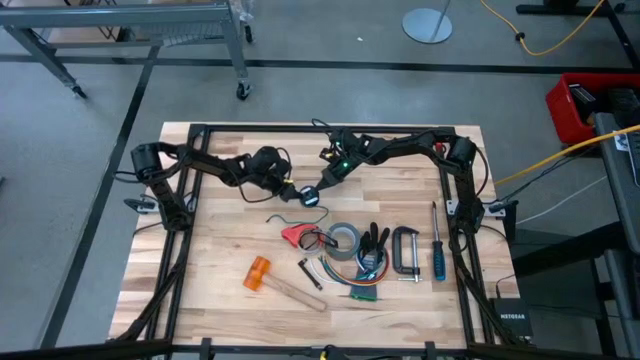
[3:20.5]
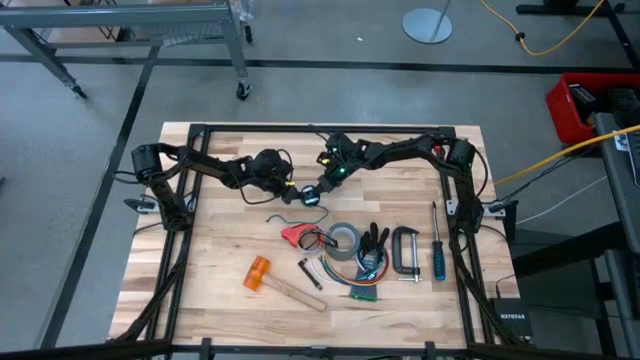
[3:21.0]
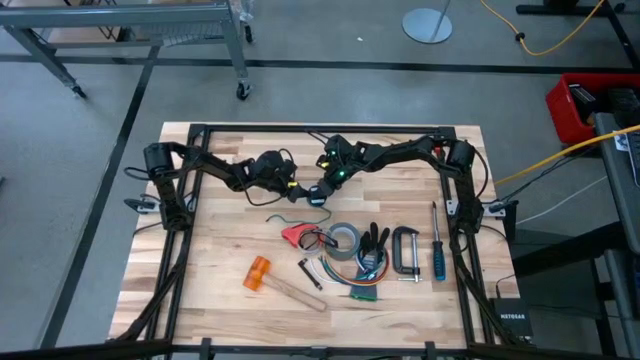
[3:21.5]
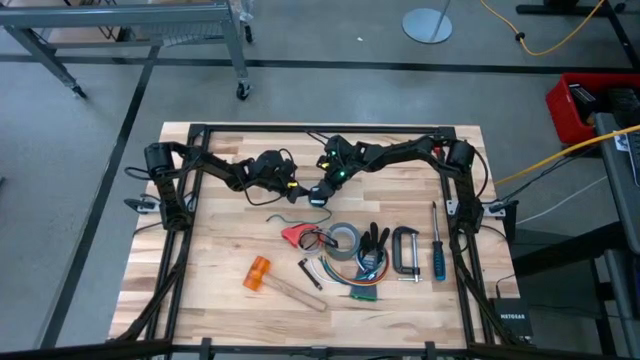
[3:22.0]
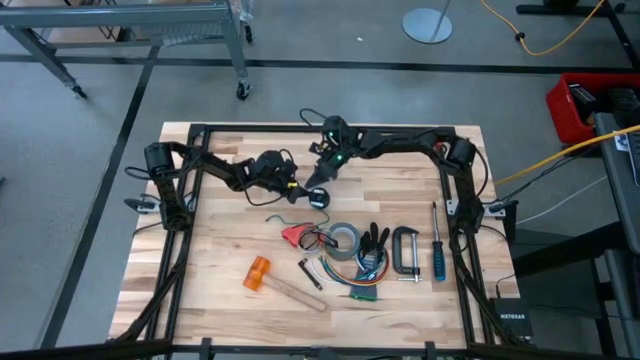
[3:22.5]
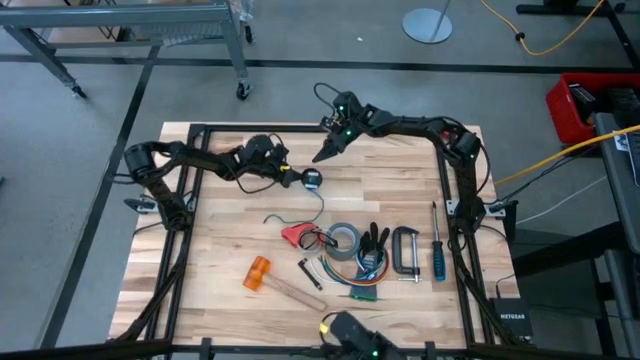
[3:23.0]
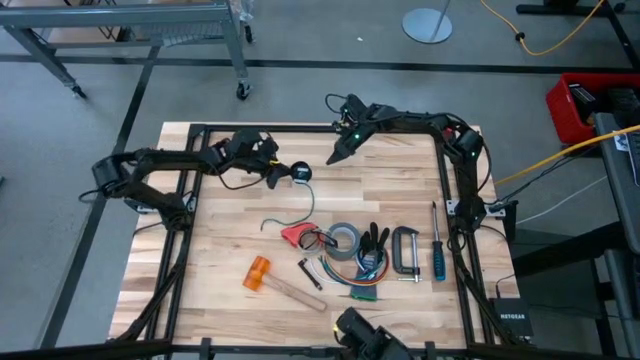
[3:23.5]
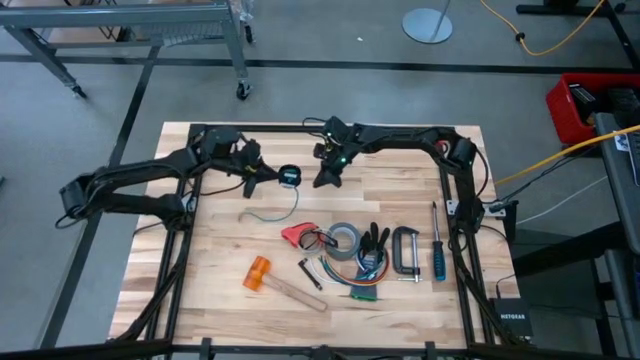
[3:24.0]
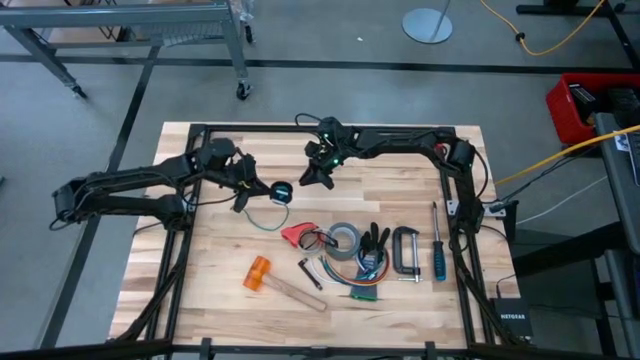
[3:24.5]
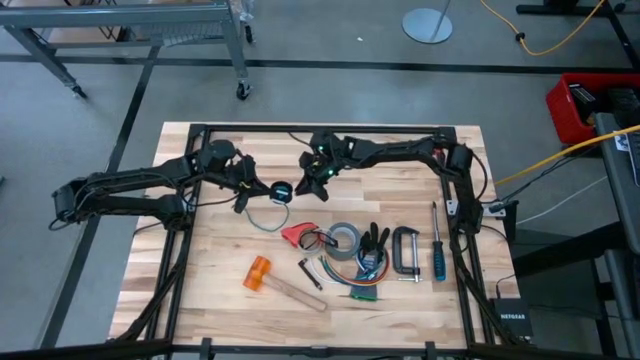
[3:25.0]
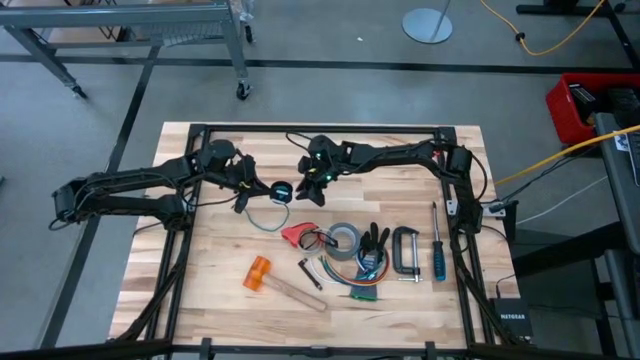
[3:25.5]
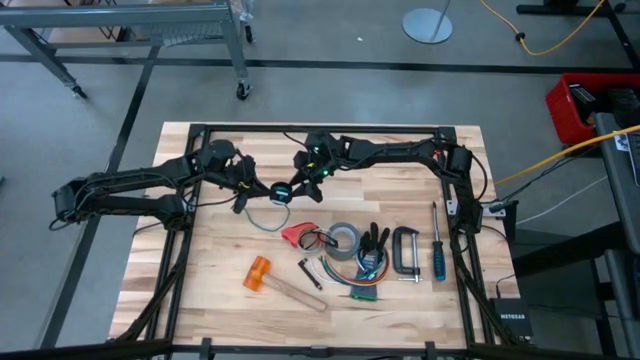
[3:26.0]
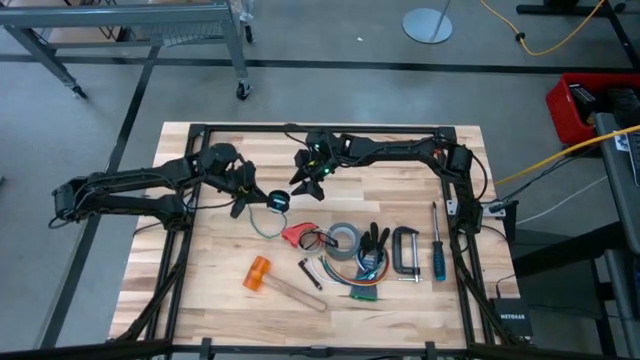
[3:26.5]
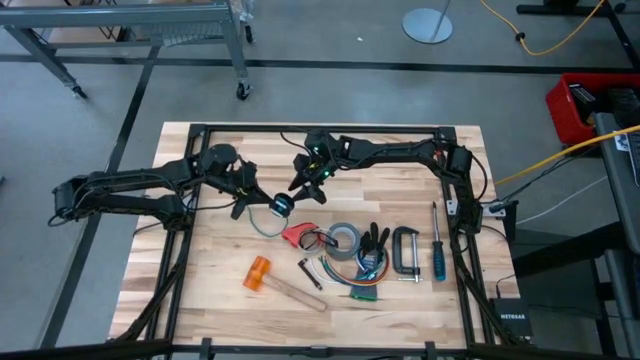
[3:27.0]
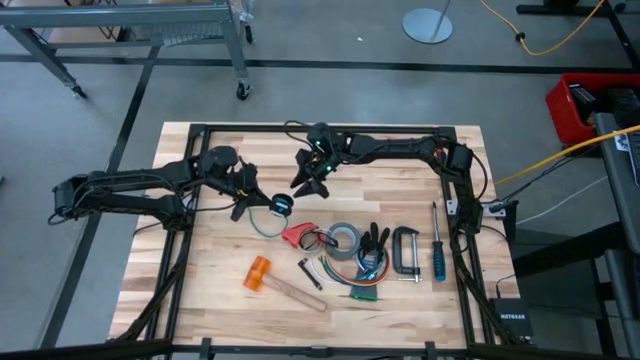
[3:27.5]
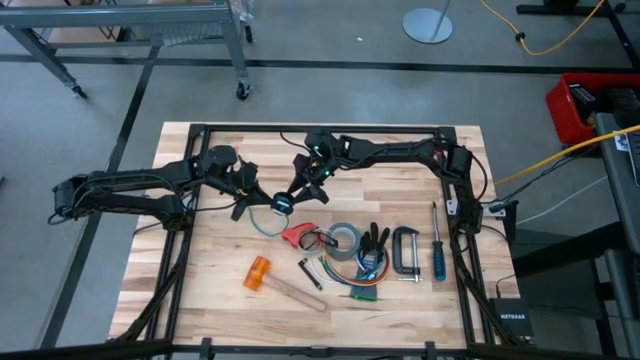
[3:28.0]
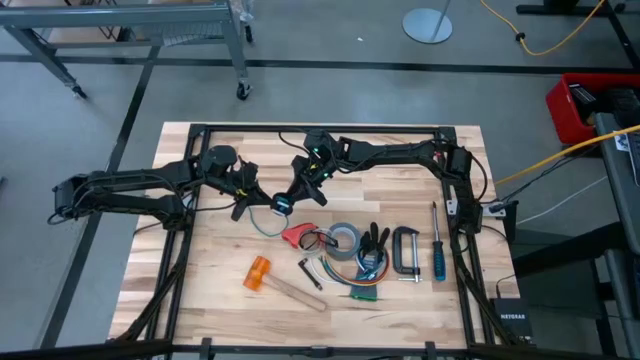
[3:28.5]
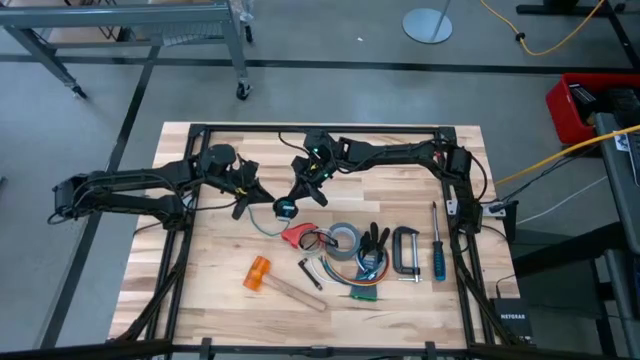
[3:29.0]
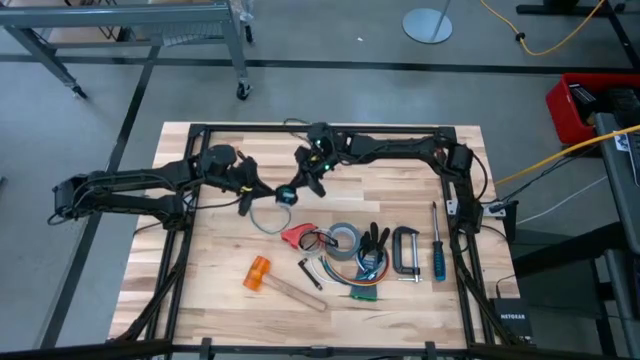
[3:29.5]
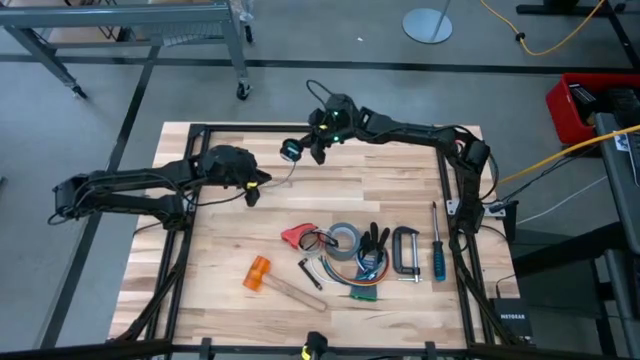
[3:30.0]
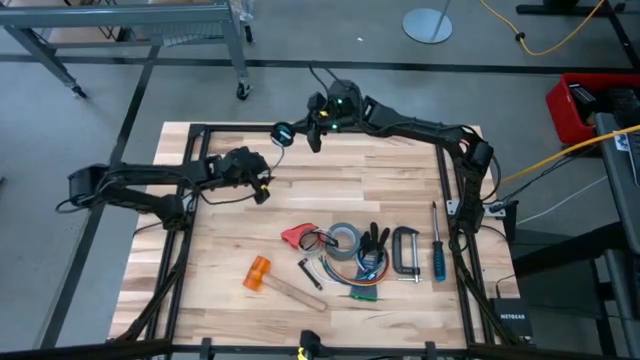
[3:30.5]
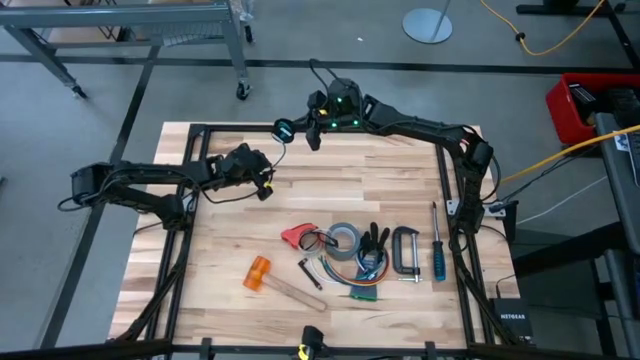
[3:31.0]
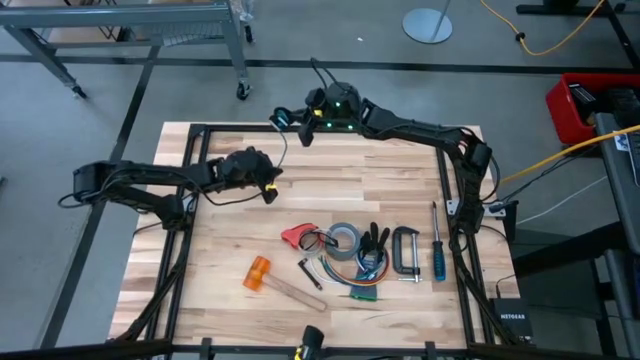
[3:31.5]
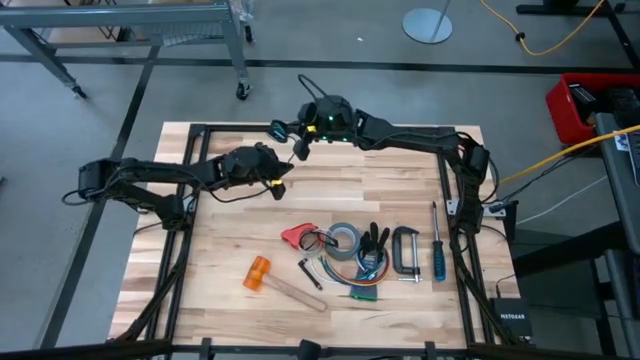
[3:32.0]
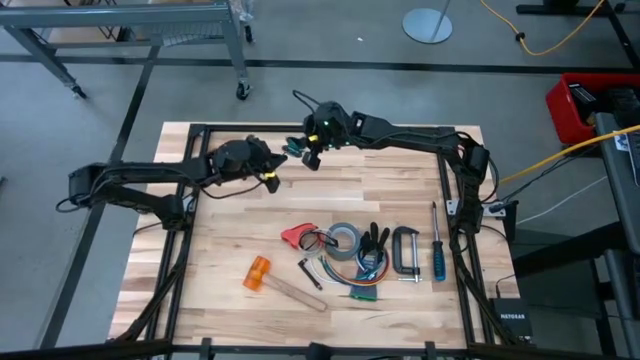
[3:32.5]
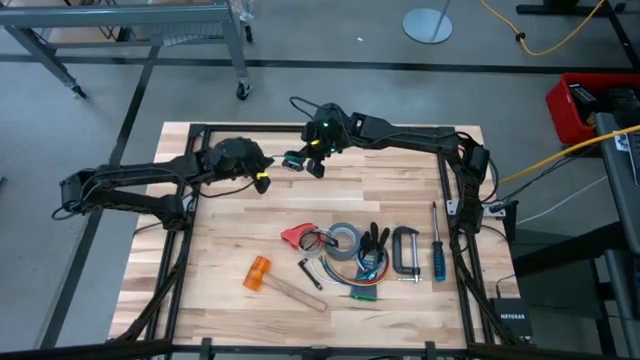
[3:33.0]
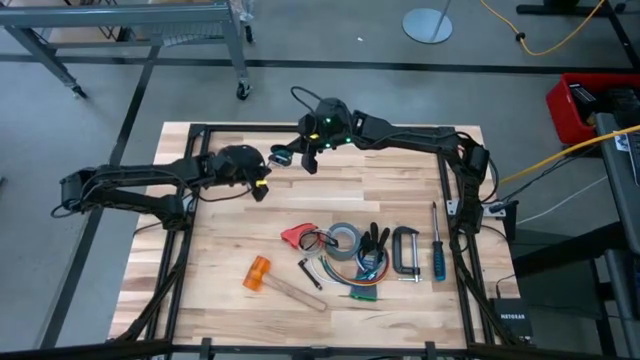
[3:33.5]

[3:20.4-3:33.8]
Task: Coil cords
Coil the green cable wire on the black spool

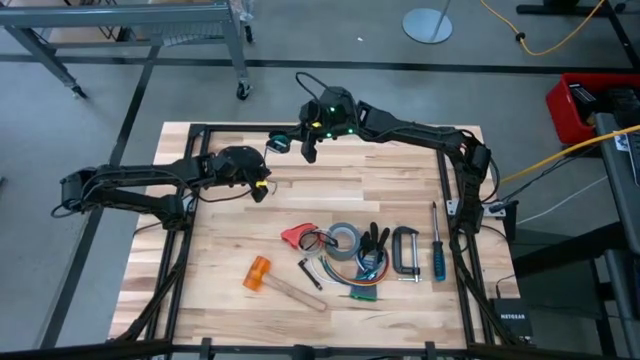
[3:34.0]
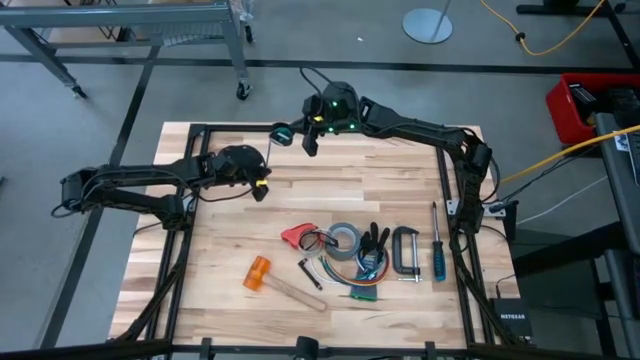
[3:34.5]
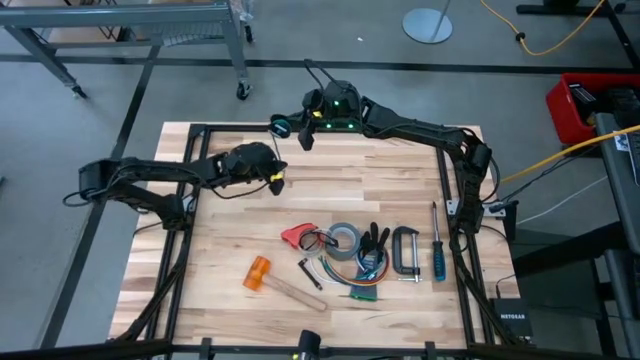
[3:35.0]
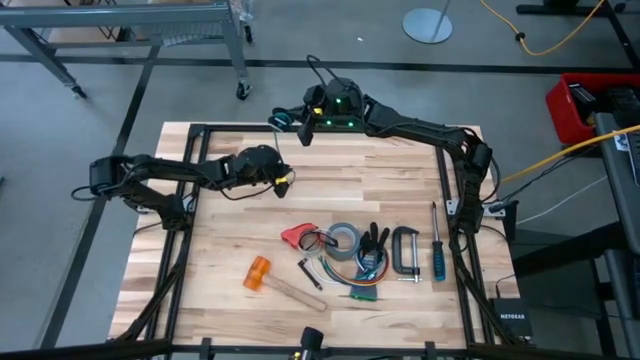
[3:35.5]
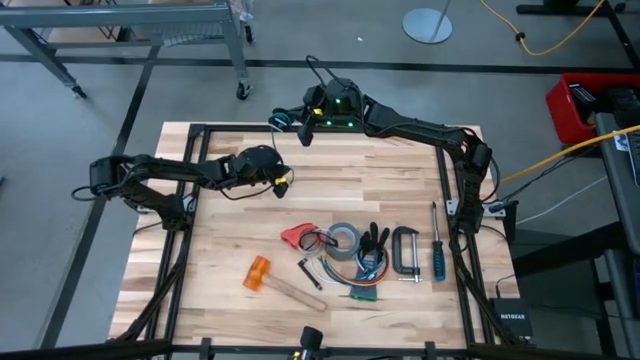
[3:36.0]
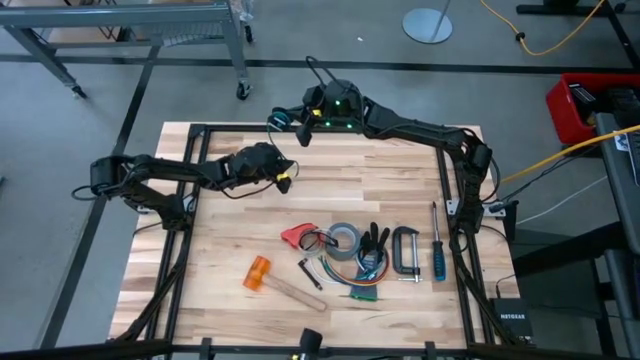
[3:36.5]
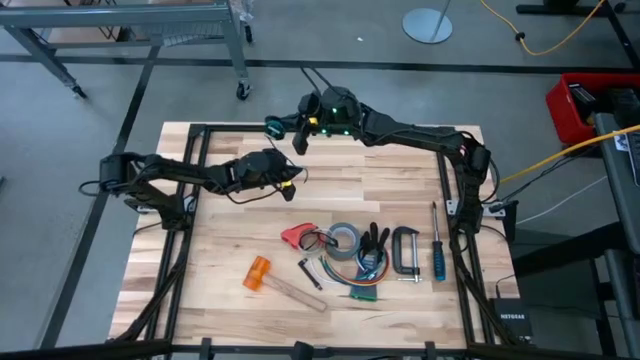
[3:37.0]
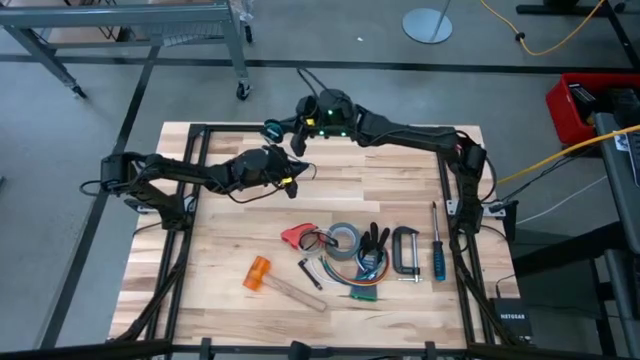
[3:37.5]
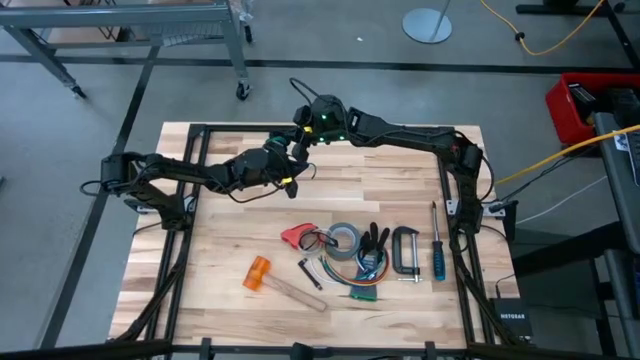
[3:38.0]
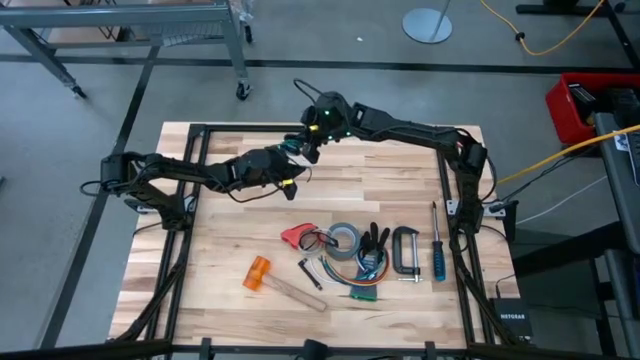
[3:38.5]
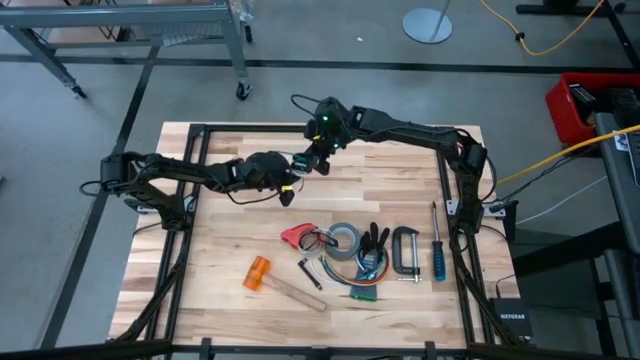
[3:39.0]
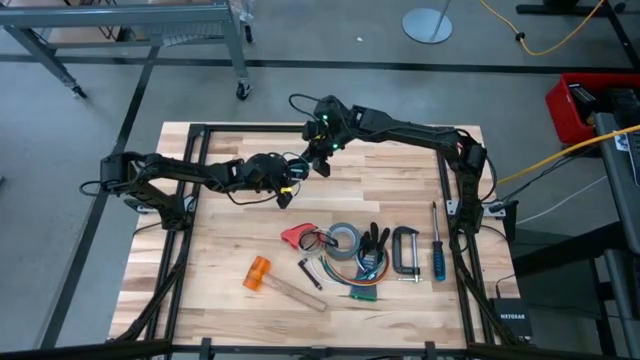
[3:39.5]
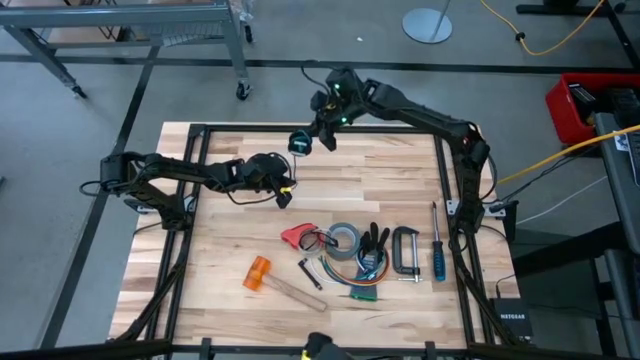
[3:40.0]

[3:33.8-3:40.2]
Coil the green cable wire on the black spool

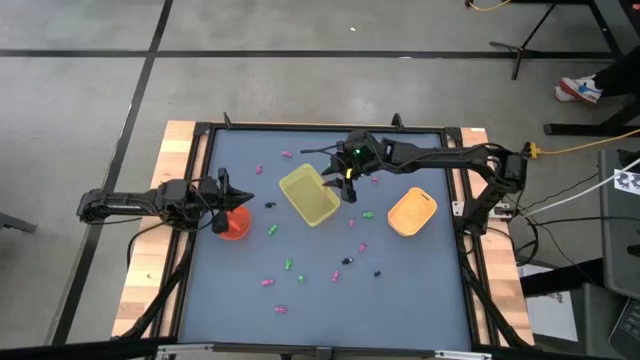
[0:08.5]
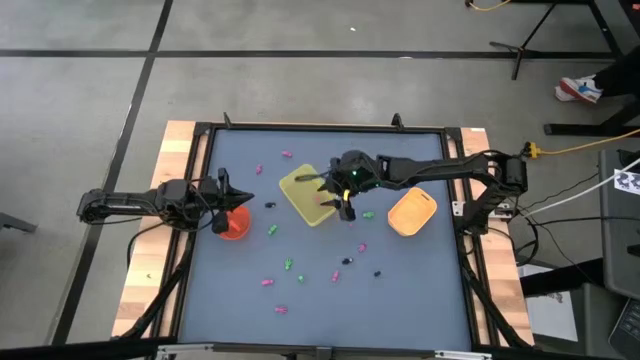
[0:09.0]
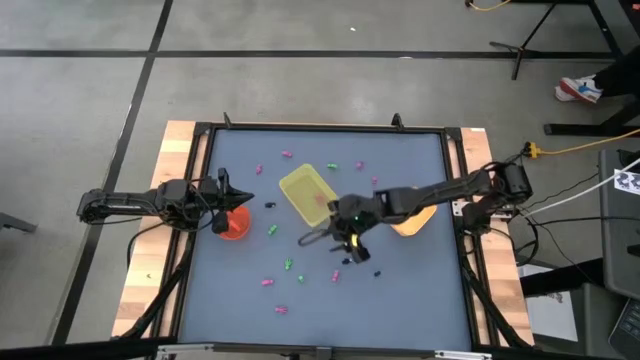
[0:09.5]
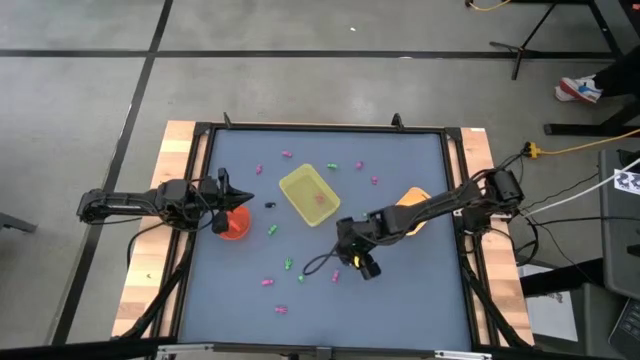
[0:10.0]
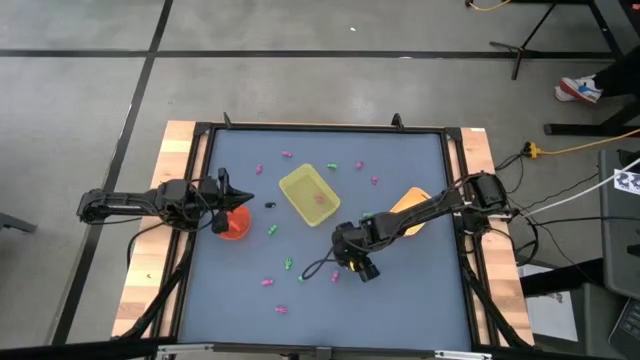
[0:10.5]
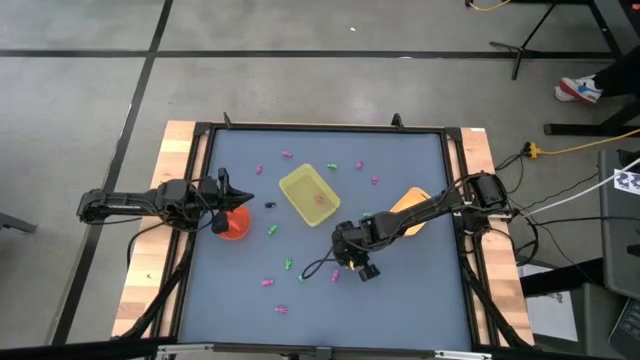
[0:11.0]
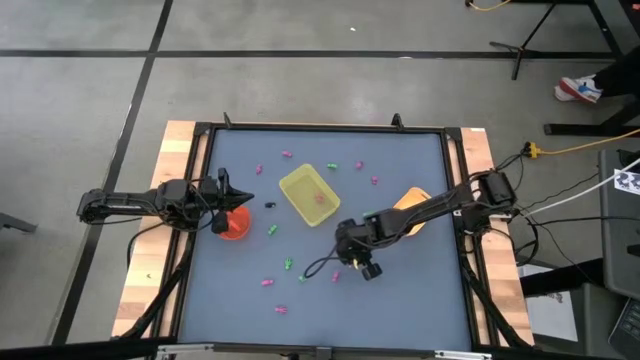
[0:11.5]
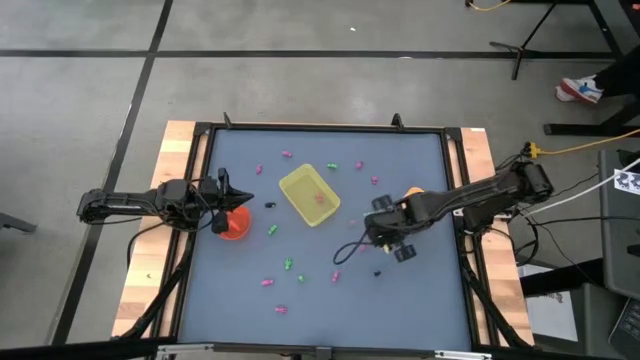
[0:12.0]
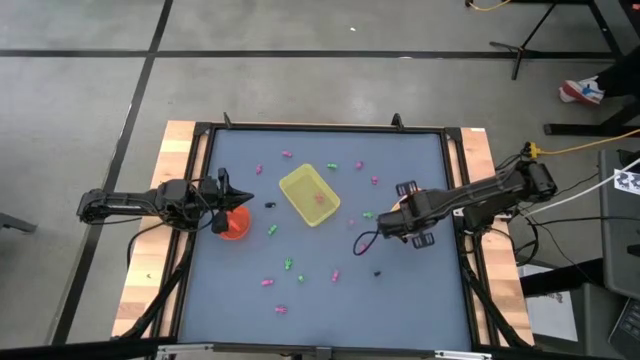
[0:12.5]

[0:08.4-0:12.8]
Task: Sort Halloween decoration
Put the black skeleton toy into the yellow-orange bin
